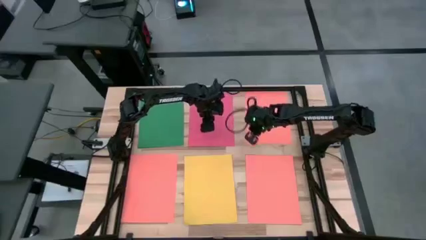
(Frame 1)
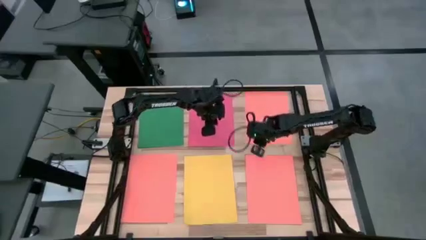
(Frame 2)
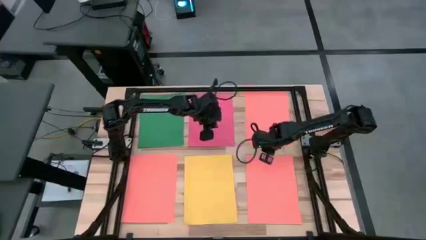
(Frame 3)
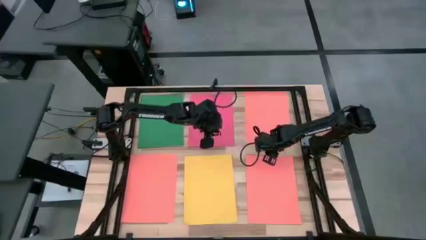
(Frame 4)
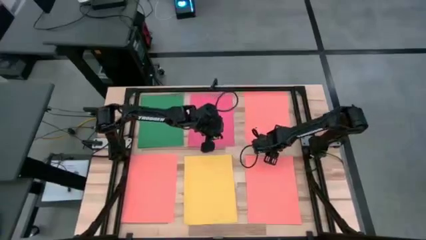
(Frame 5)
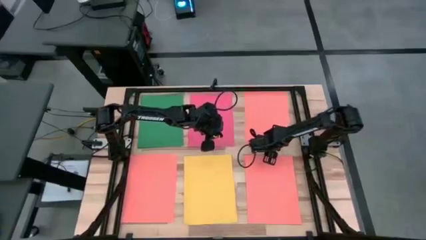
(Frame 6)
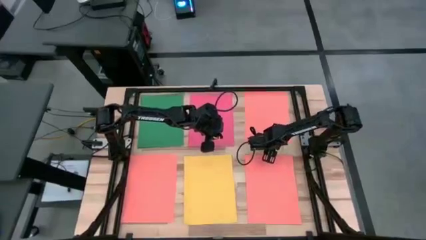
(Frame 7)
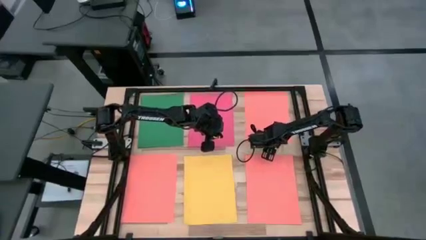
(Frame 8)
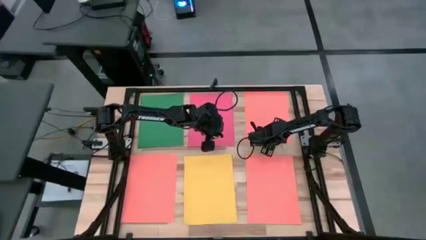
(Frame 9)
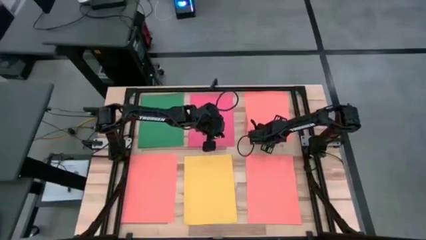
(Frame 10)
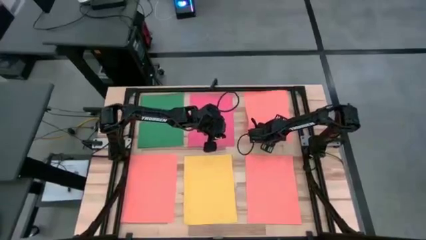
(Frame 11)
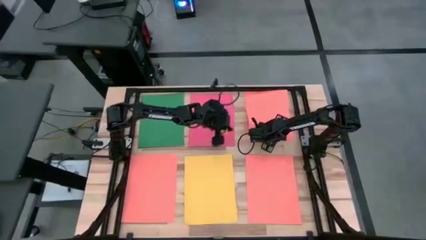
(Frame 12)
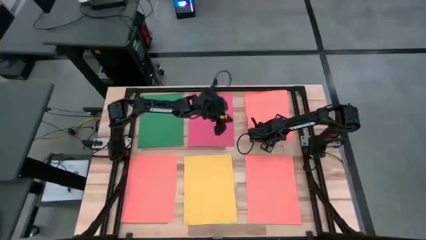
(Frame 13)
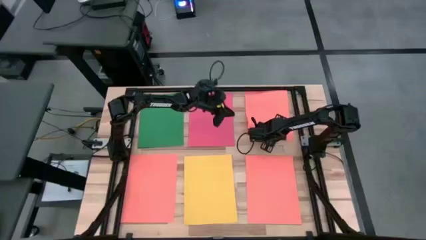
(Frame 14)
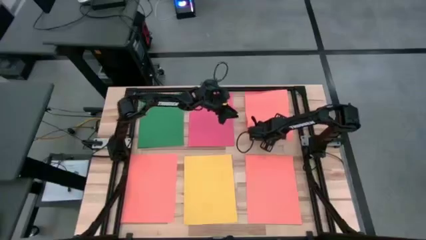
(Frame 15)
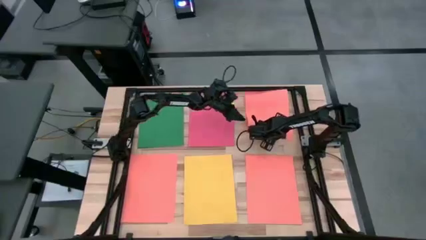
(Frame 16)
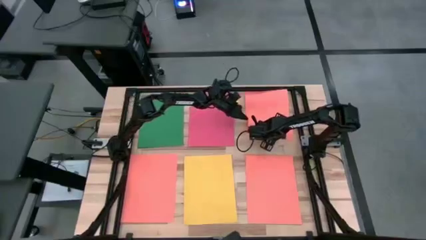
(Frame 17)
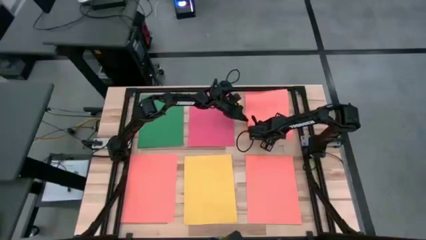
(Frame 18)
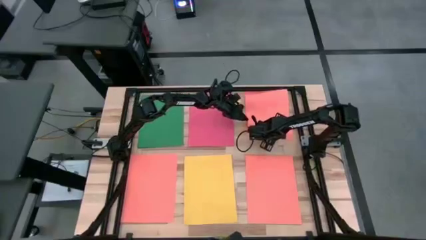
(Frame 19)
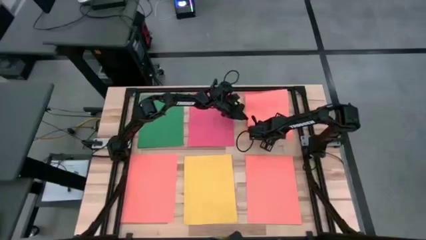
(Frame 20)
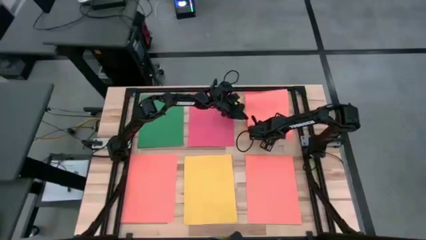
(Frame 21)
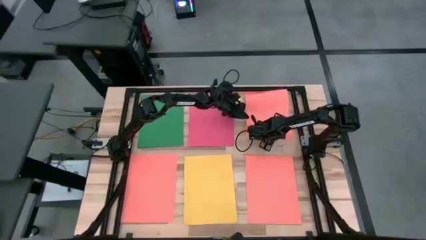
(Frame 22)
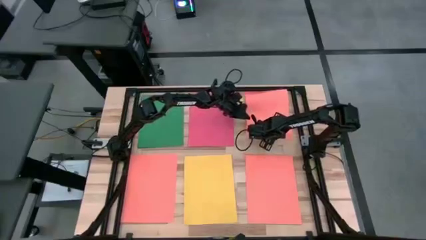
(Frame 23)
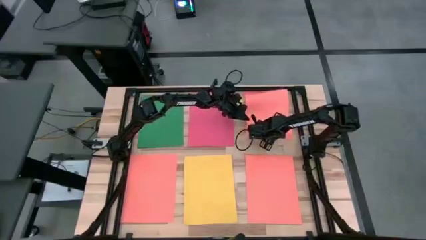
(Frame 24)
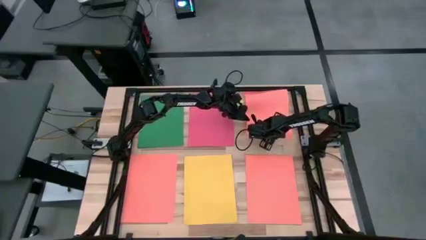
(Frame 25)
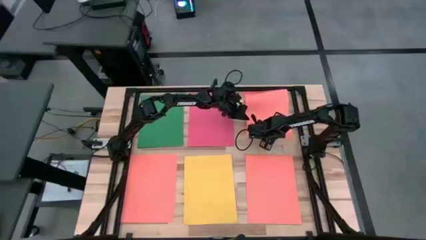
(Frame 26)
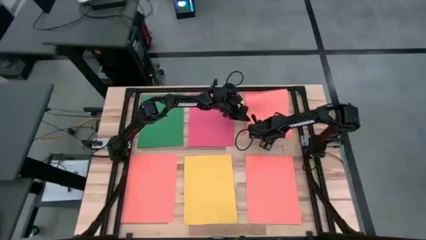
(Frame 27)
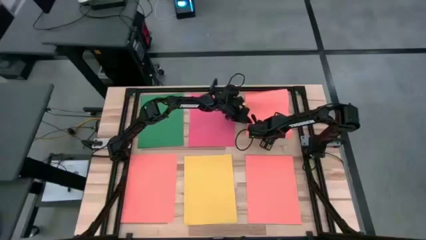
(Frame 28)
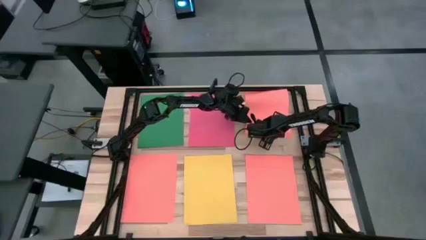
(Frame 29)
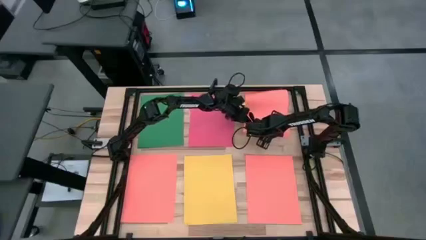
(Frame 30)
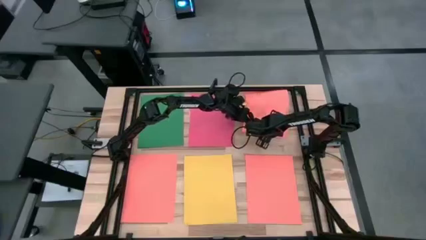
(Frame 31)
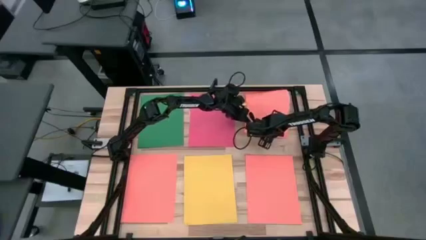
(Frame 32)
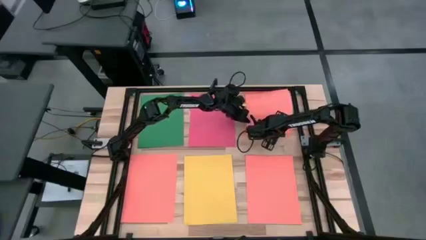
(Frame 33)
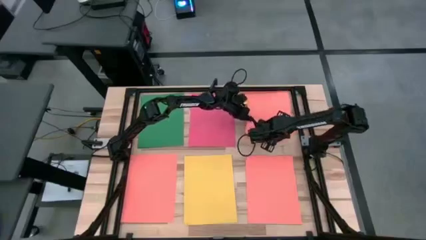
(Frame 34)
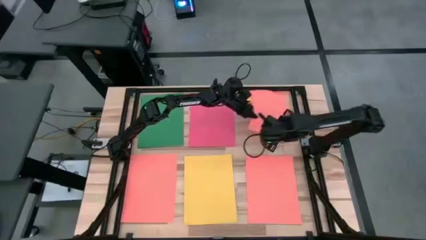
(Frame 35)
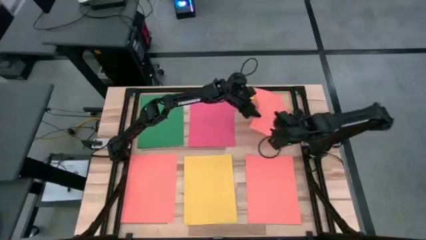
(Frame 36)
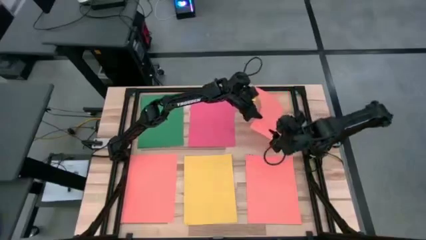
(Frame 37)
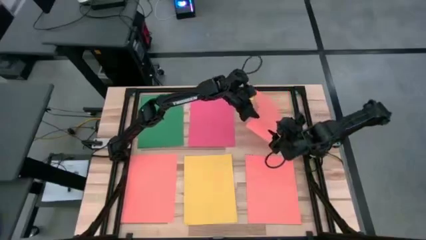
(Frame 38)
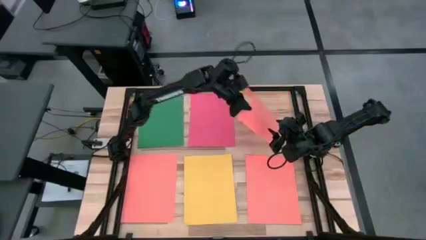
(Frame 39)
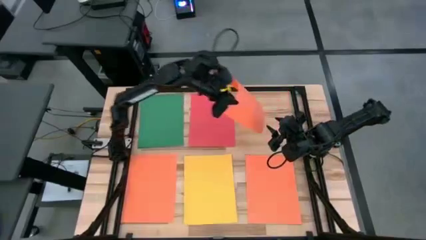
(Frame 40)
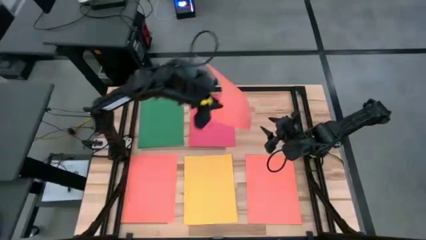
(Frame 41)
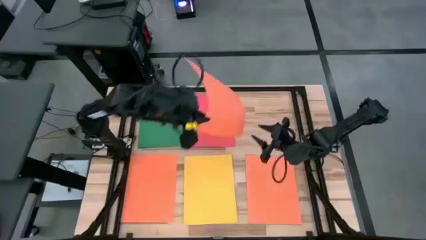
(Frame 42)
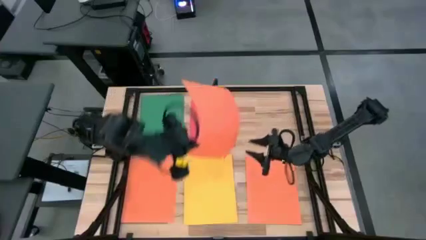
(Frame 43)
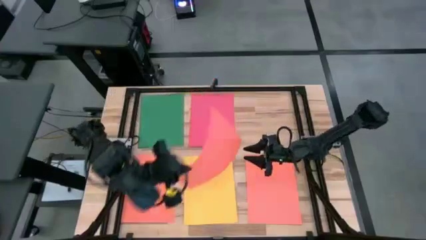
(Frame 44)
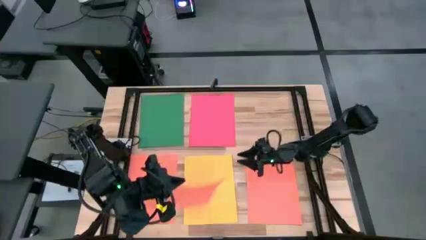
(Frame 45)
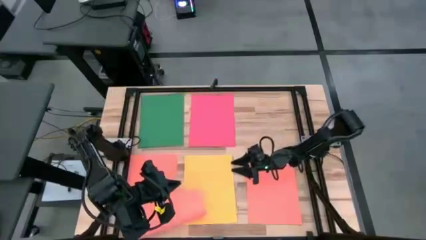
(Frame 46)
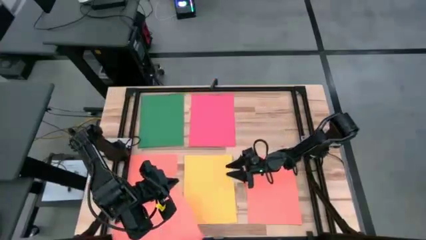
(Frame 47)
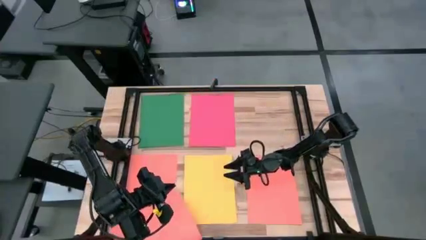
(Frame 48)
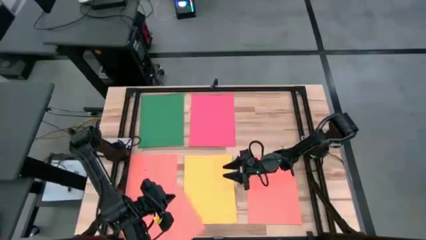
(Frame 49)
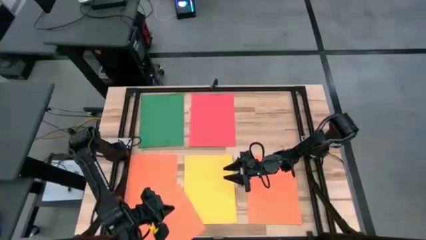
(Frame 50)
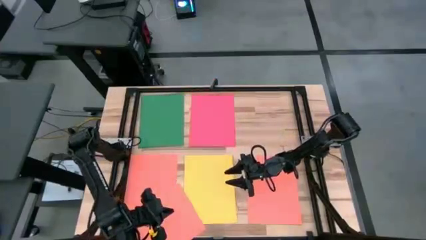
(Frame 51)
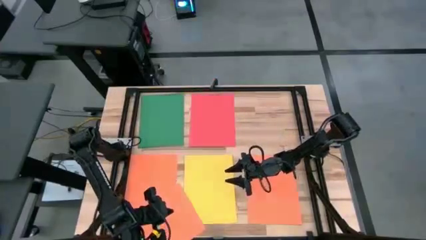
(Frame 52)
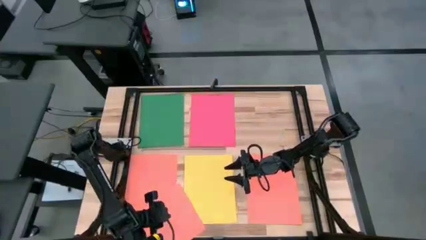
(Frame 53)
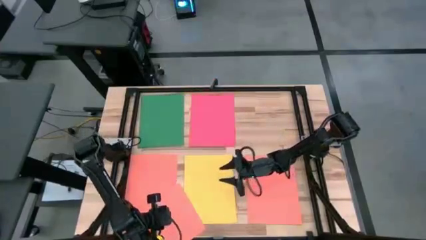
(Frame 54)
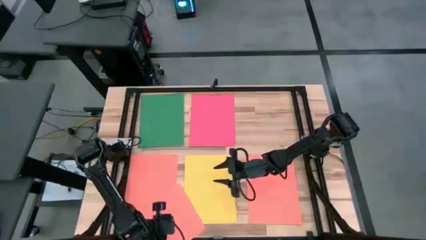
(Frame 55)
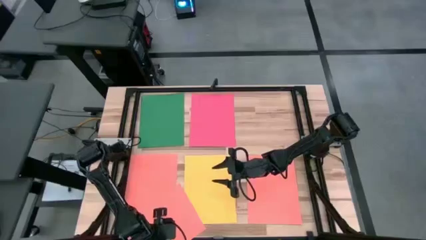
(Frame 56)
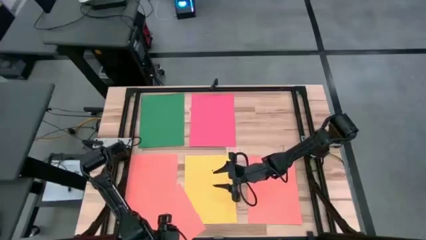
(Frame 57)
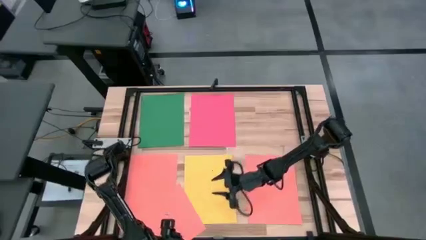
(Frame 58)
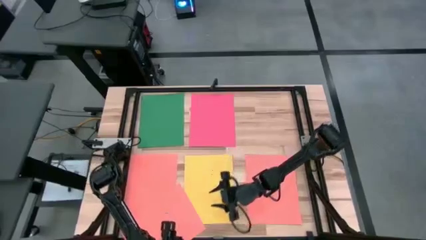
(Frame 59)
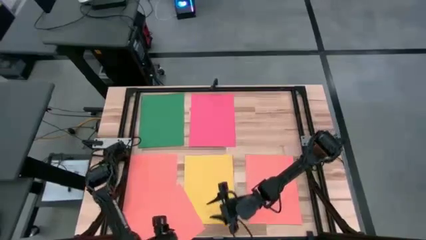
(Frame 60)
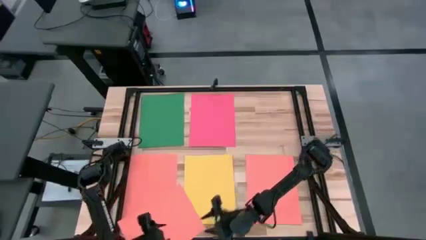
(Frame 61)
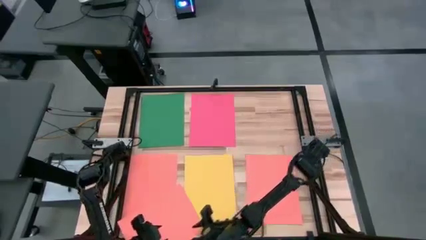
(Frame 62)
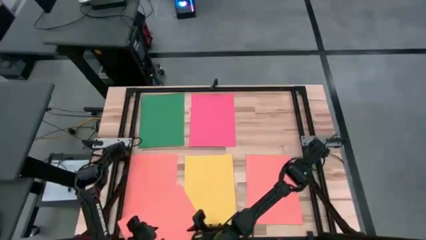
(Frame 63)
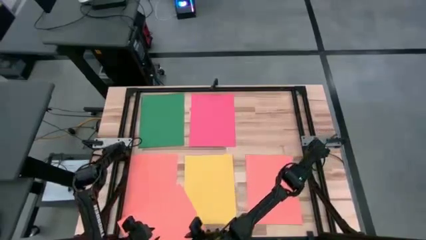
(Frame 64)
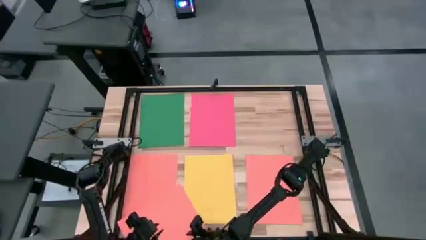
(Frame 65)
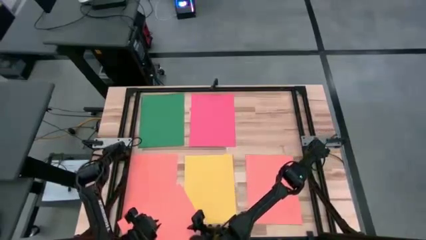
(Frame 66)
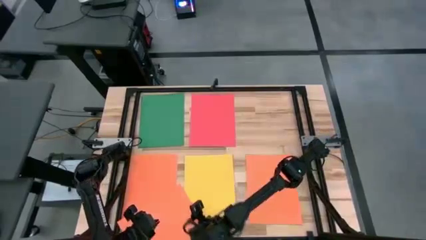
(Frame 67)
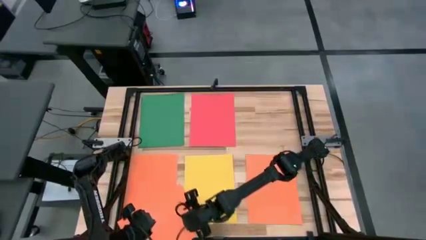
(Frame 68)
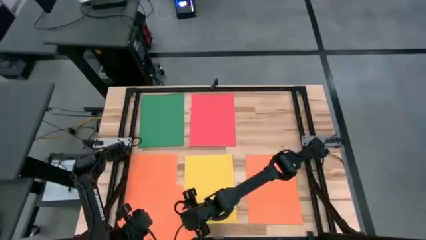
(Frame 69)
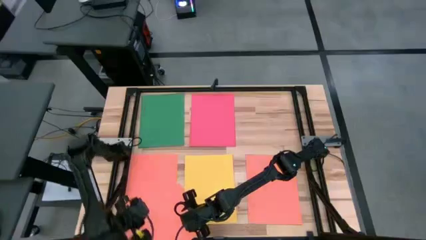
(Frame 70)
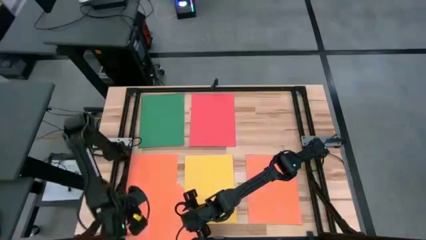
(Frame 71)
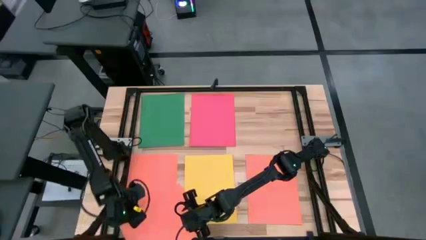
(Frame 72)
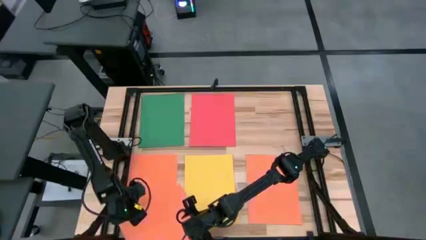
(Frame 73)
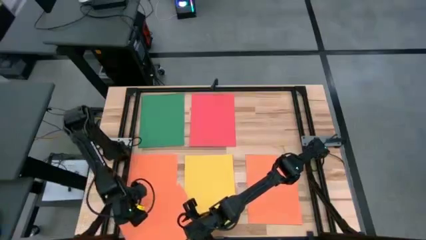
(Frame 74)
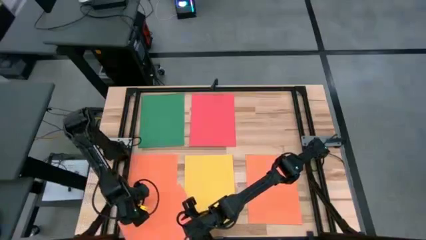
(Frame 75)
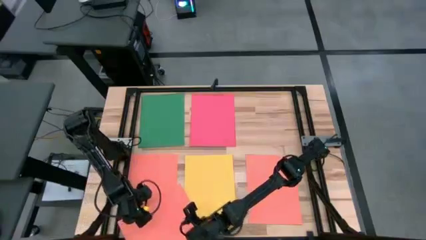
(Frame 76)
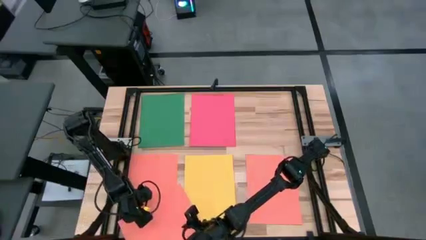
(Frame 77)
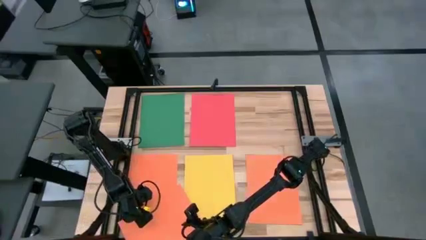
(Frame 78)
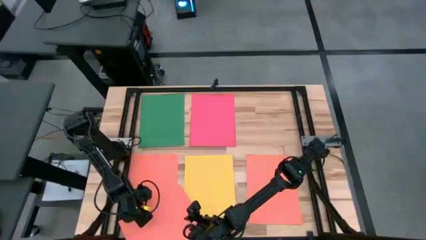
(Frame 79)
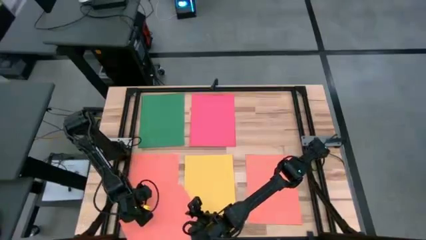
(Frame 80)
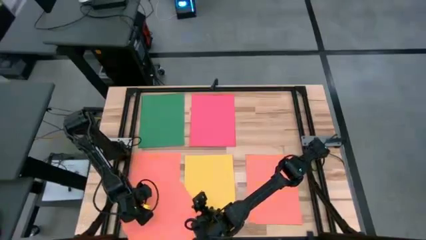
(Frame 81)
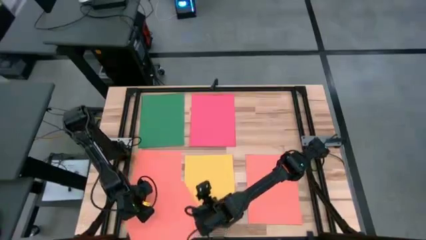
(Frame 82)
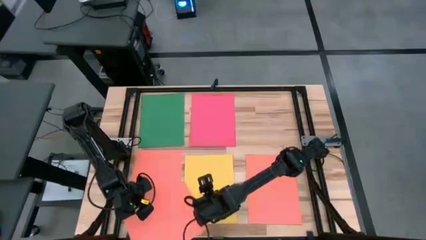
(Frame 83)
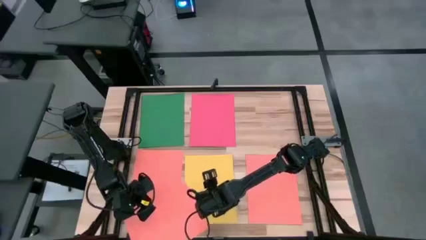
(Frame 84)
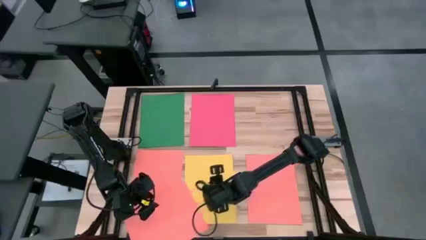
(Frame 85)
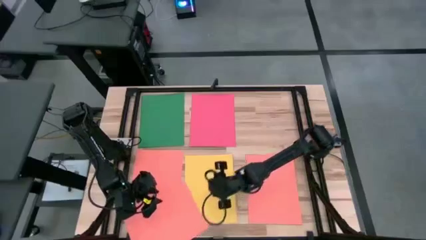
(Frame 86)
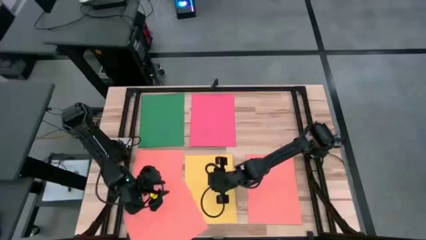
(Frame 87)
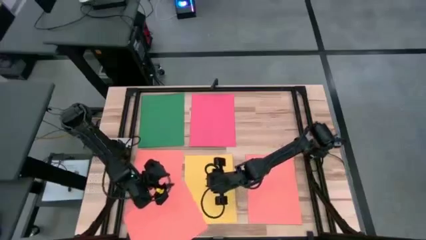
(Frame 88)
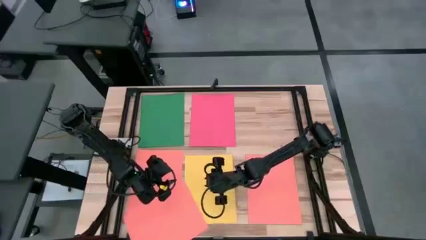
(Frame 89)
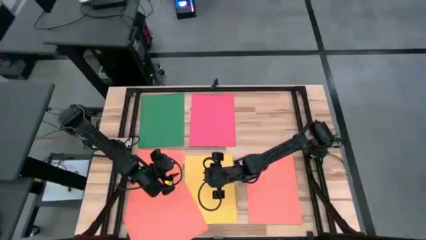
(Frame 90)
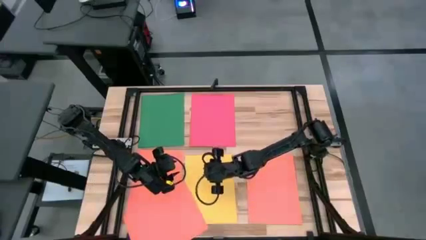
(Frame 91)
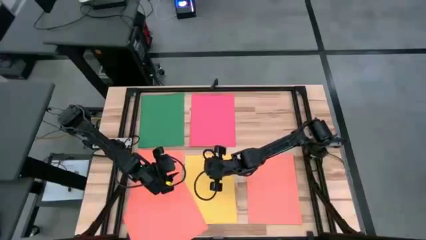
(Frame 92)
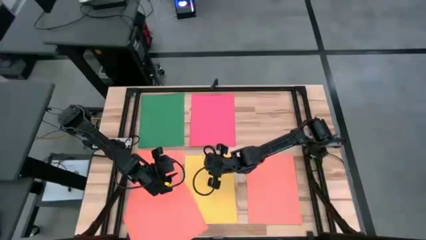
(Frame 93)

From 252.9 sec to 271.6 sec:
Task: Organize paper
Stack the orange paper on top of the orange paper
